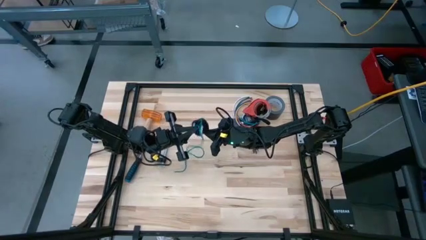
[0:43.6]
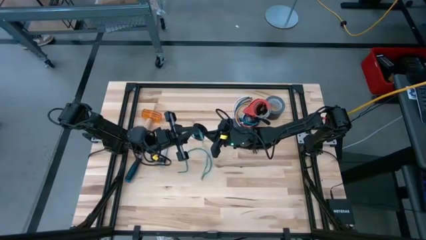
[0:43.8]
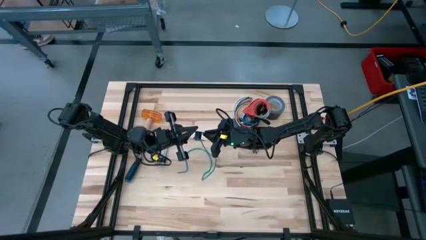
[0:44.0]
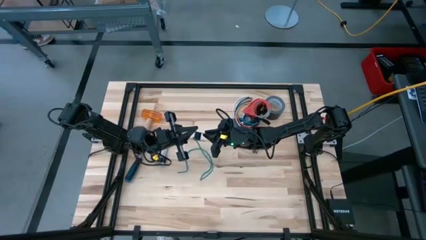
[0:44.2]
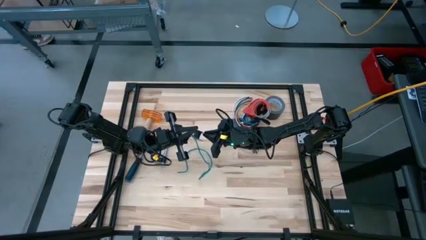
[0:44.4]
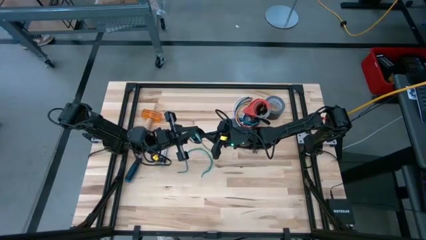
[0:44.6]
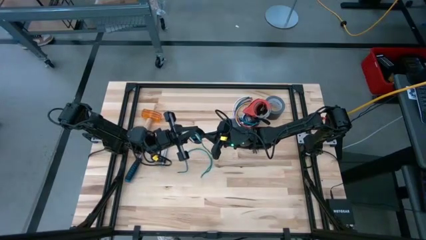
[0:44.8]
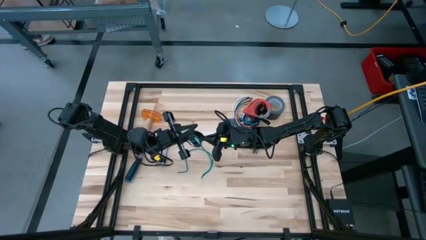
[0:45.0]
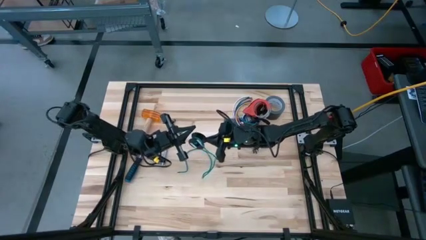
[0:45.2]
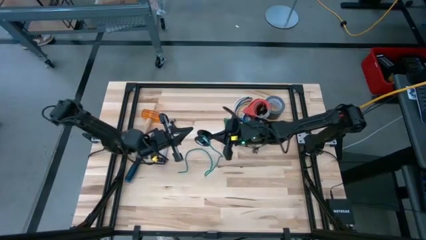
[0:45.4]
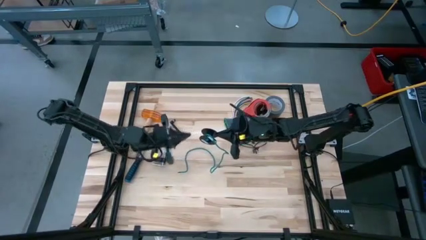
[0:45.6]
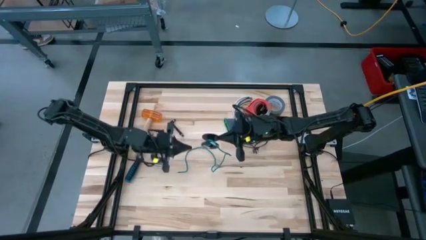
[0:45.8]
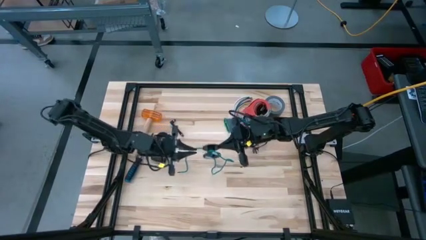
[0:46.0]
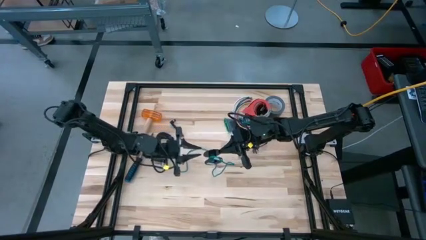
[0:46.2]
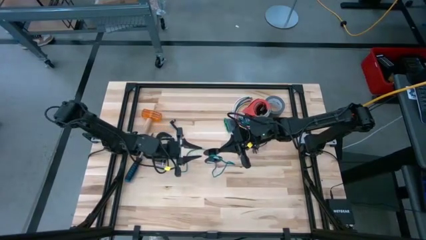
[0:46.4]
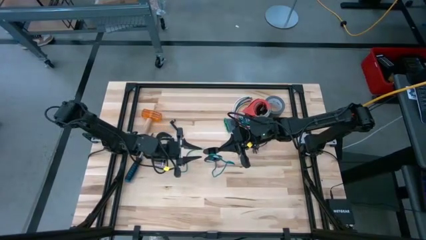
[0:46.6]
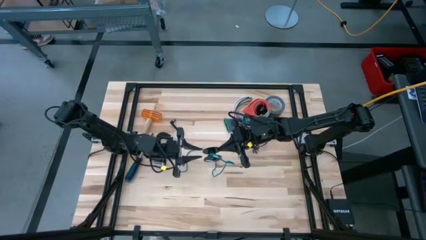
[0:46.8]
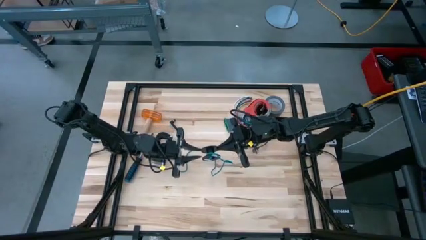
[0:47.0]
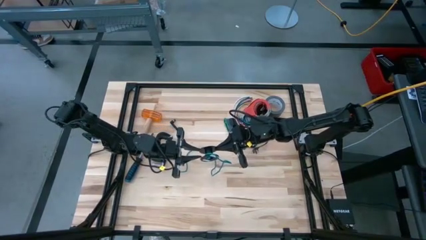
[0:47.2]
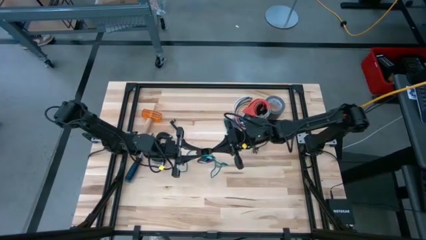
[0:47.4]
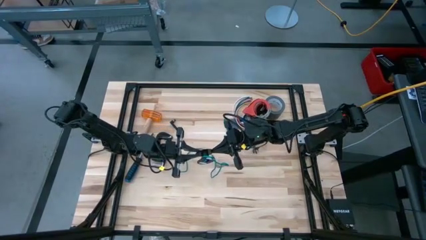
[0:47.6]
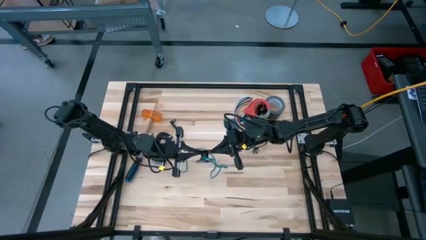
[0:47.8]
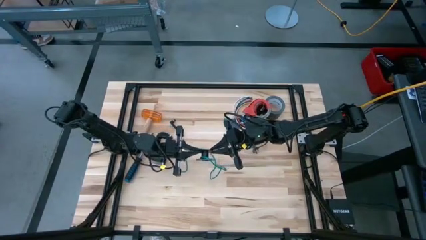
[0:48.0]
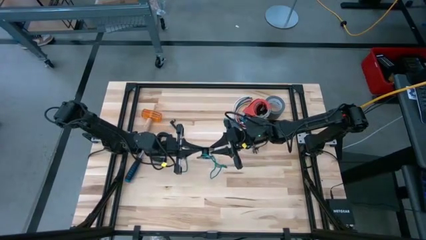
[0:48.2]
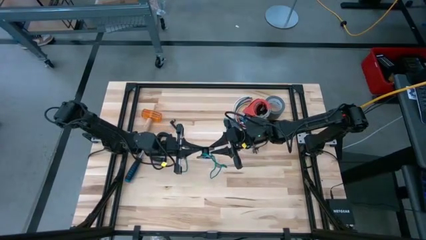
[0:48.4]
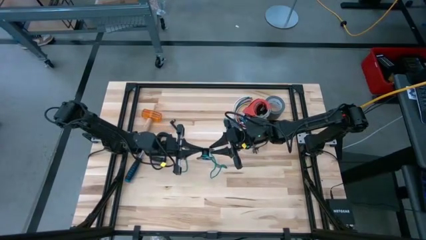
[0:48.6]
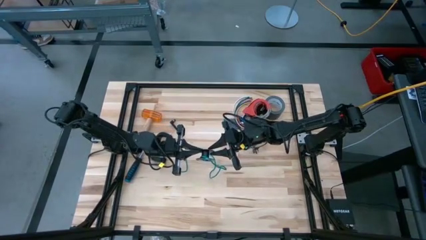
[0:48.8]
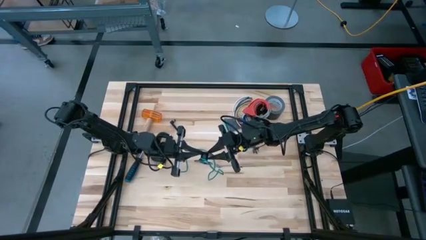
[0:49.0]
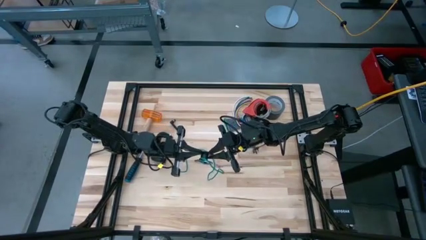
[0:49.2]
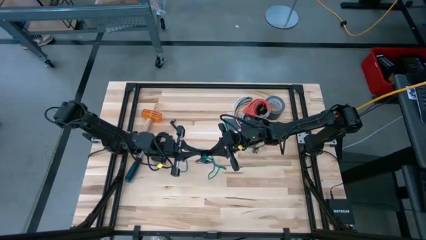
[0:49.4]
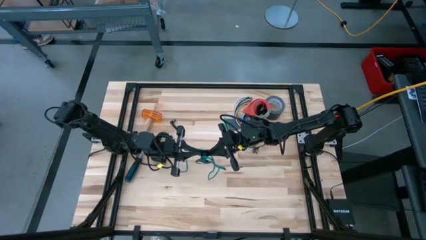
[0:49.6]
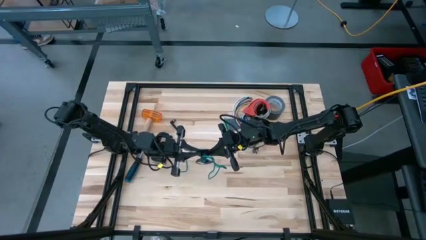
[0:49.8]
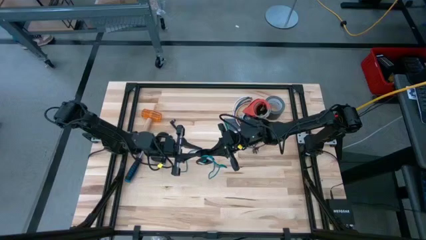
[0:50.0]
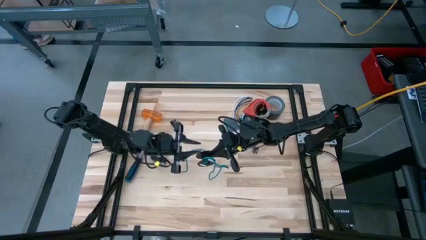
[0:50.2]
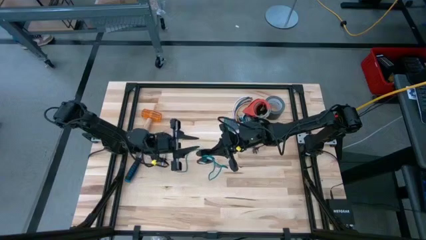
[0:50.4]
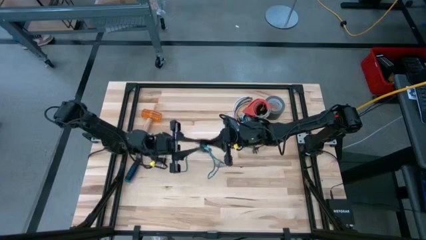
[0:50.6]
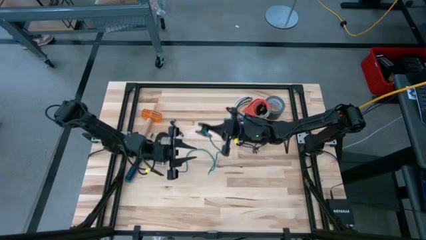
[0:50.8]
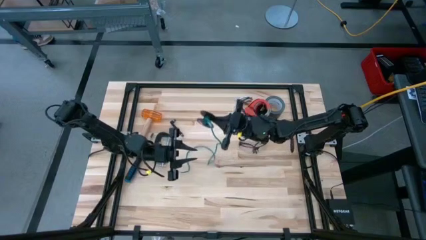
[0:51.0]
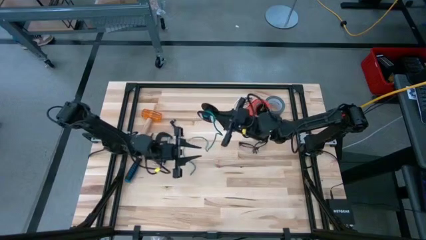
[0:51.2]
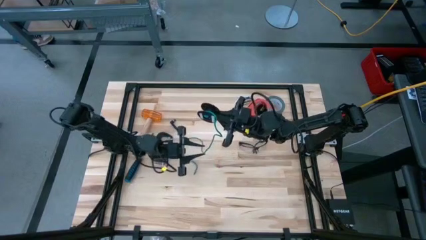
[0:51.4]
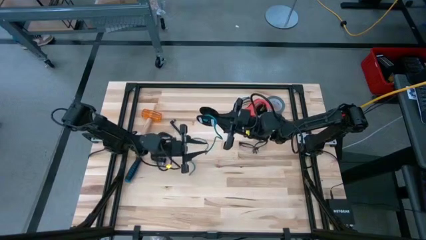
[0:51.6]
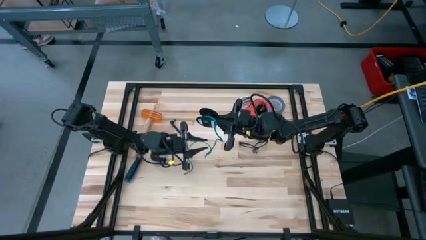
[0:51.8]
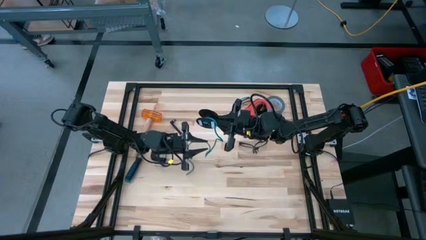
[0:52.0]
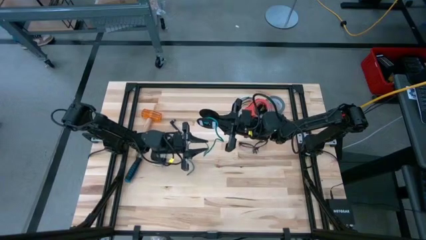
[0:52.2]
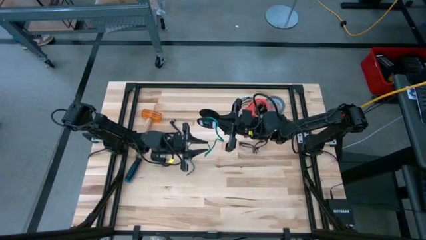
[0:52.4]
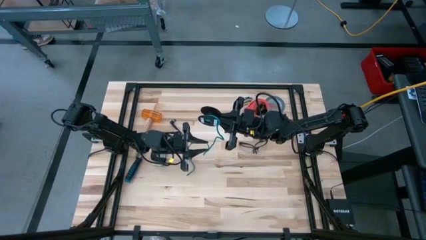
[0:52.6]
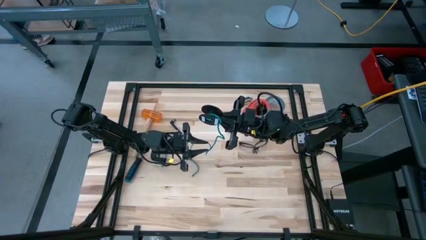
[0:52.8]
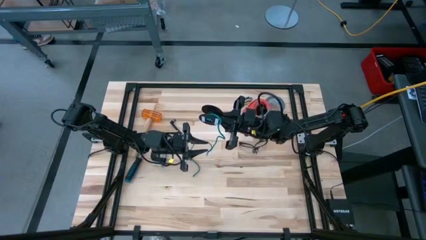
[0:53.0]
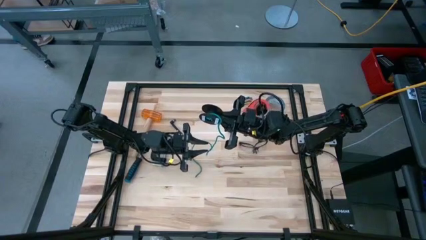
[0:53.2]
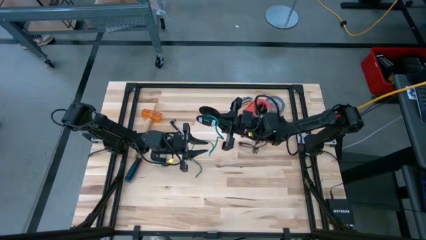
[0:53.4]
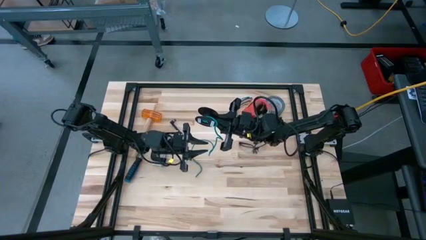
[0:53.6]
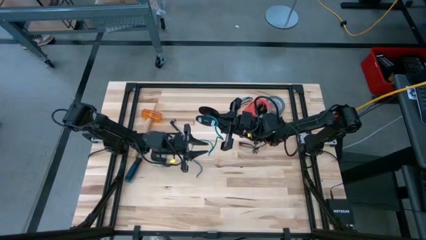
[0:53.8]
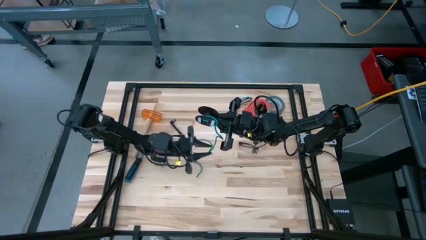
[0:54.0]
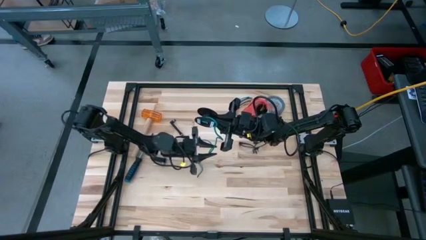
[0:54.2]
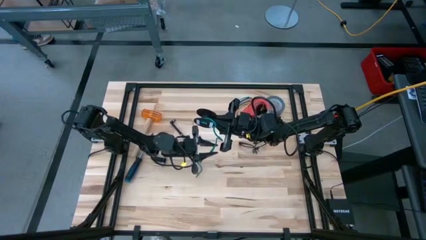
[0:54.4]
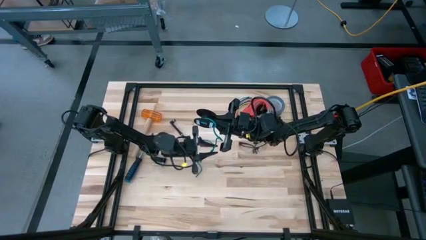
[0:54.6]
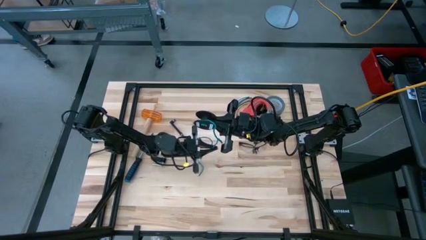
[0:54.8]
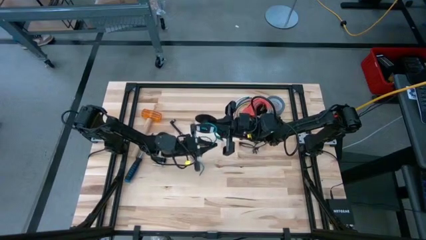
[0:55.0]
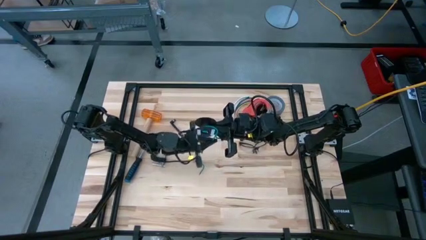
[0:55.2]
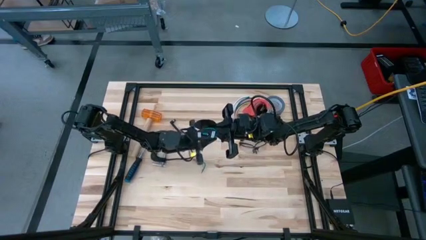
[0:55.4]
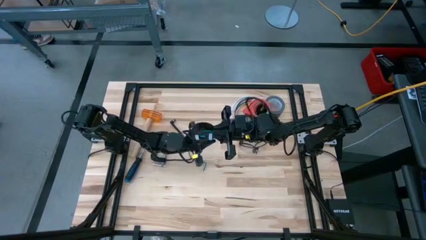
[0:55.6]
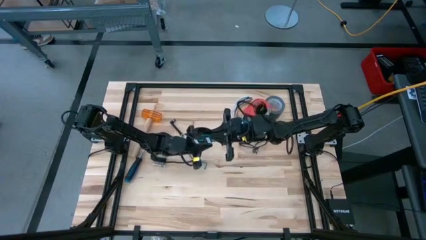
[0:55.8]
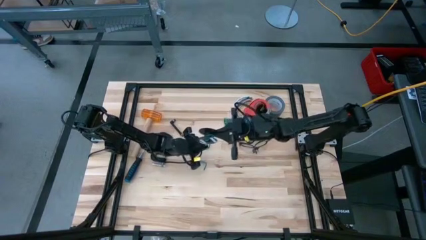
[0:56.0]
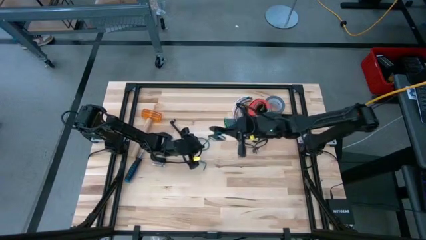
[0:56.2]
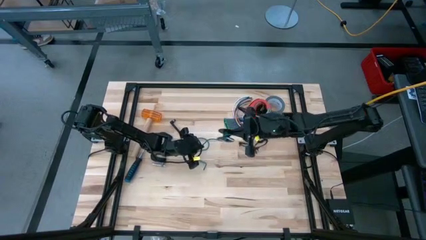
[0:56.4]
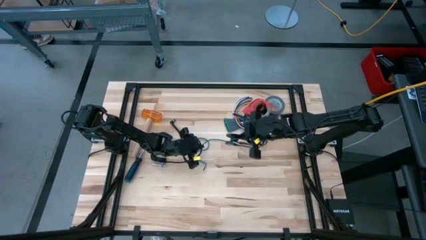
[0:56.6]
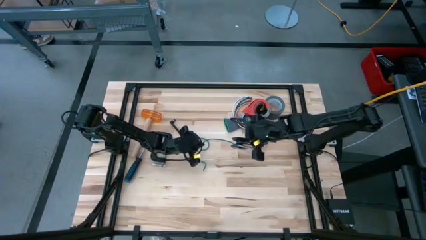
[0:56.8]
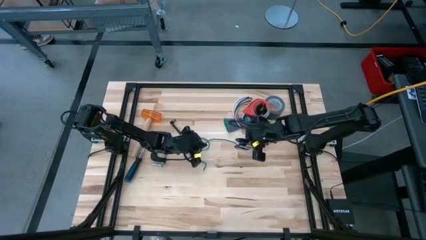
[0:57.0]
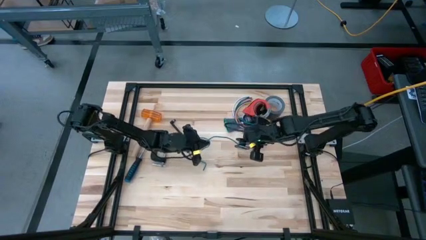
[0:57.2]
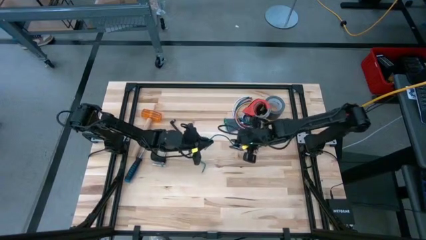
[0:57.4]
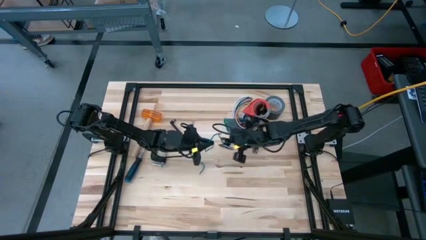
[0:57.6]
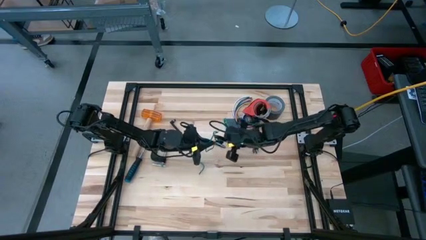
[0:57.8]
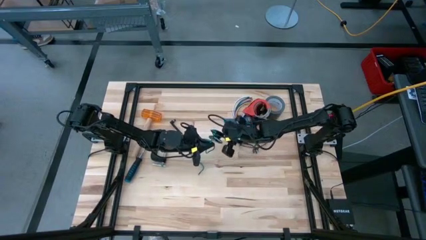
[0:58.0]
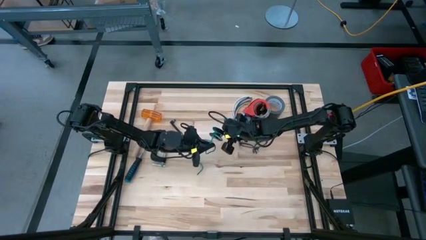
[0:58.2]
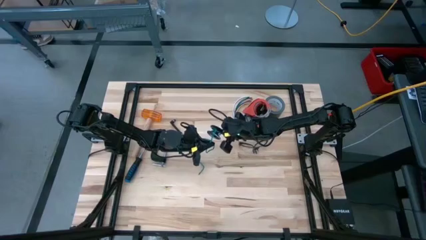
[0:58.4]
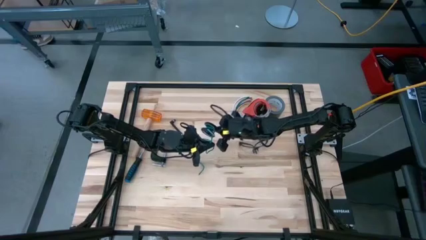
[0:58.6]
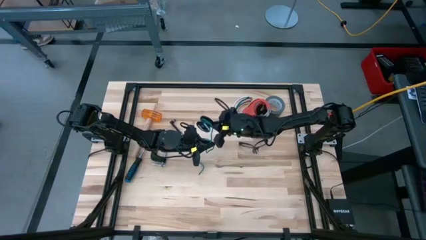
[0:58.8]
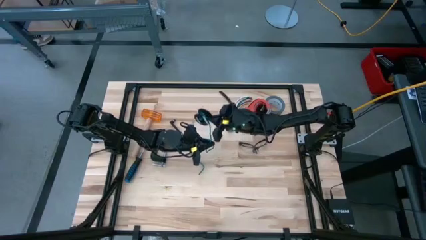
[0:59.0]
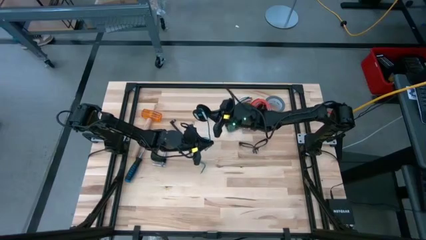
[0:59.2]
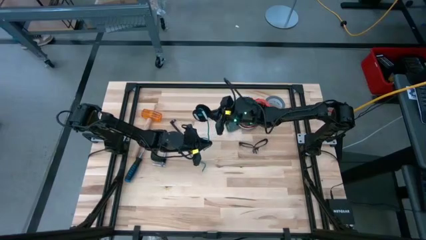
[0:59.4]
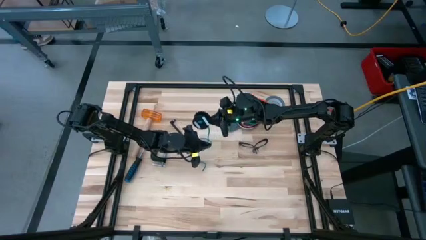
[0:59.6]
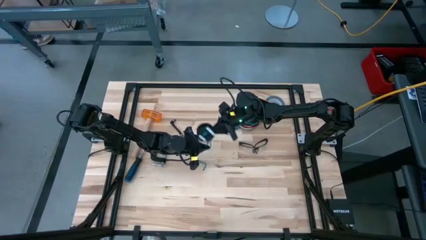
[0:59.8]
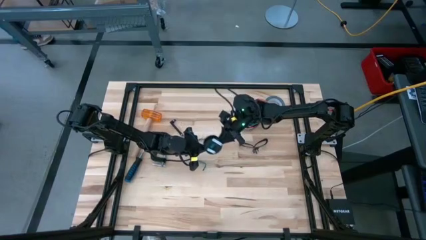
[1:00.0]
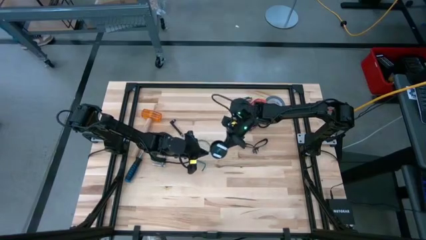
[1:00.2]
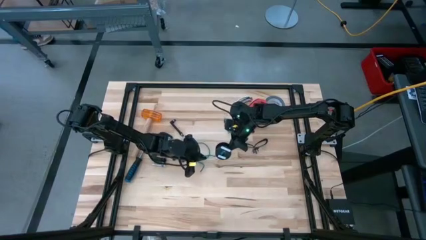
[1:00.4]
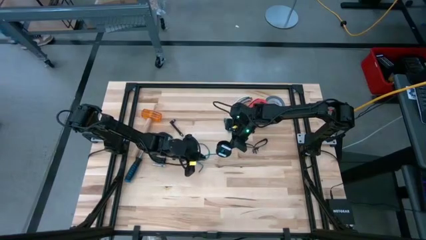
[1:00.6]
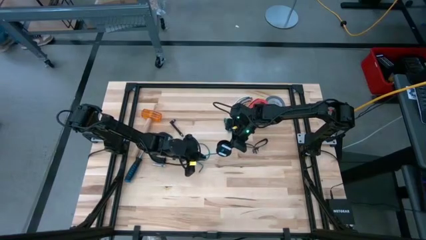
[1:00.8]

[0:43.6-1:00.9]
Task: Coil cords
Coil the green wire to the spool
